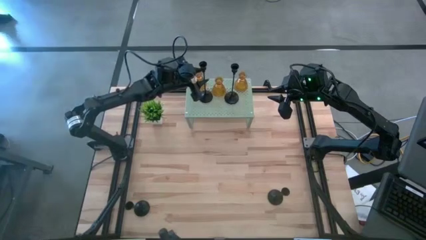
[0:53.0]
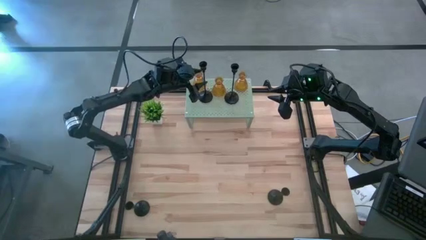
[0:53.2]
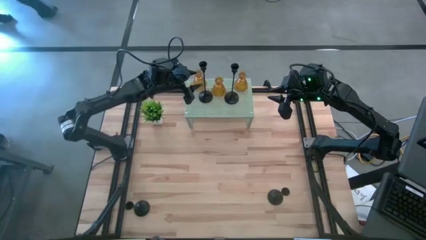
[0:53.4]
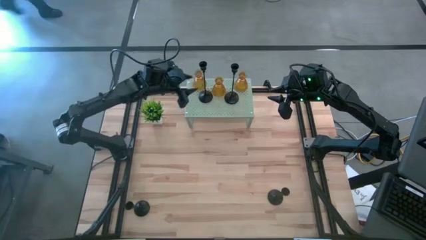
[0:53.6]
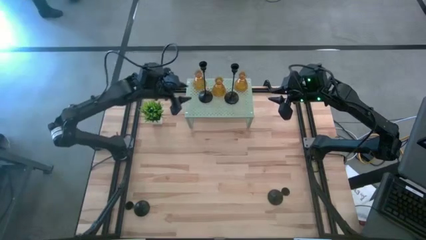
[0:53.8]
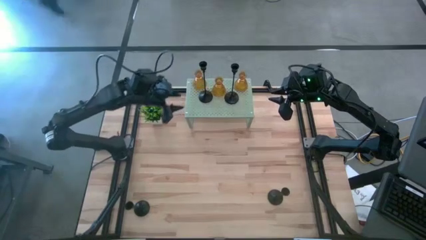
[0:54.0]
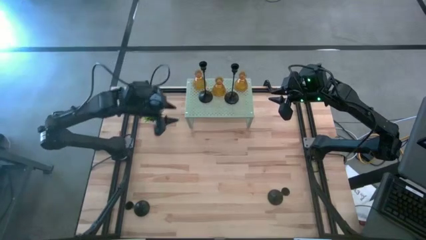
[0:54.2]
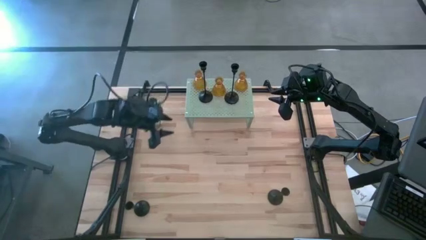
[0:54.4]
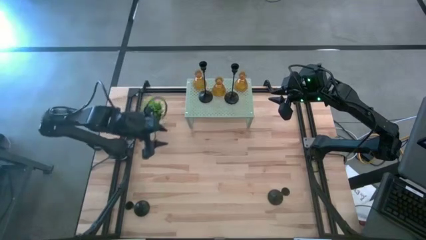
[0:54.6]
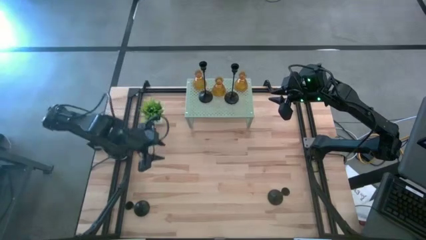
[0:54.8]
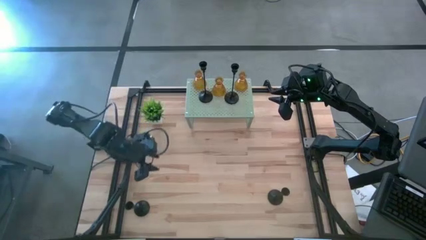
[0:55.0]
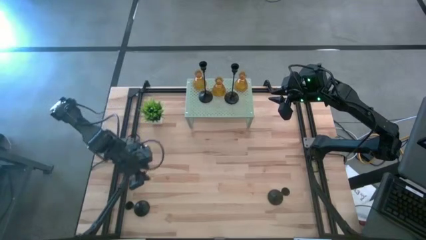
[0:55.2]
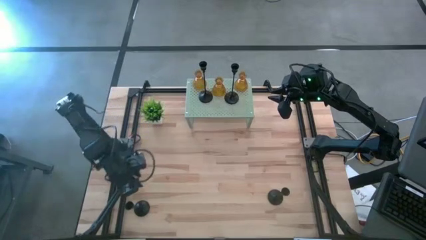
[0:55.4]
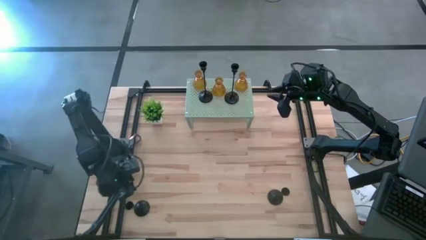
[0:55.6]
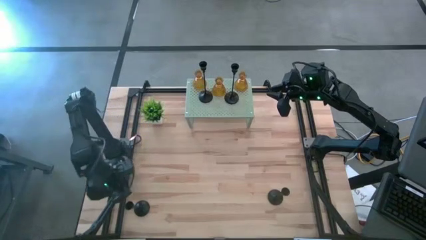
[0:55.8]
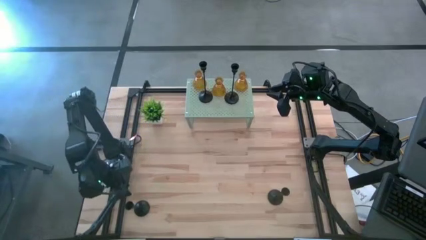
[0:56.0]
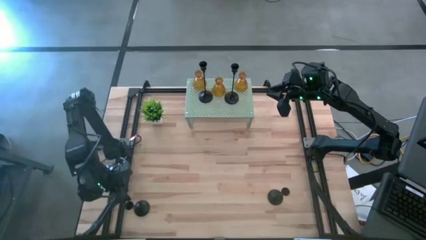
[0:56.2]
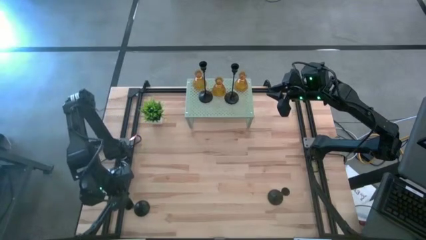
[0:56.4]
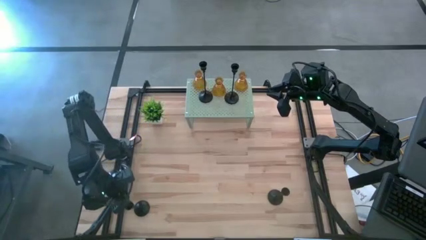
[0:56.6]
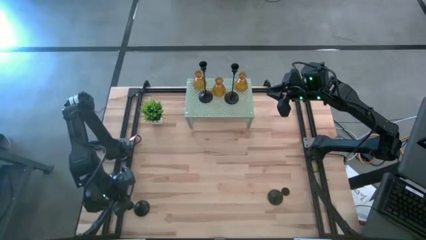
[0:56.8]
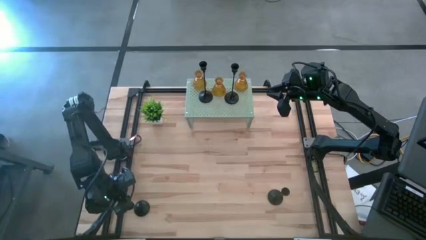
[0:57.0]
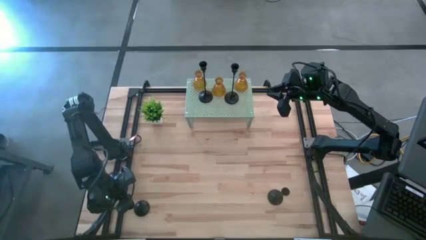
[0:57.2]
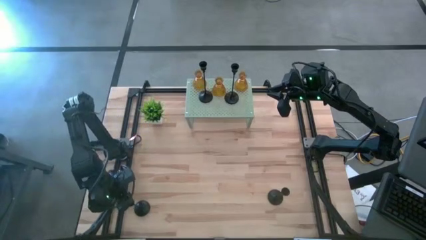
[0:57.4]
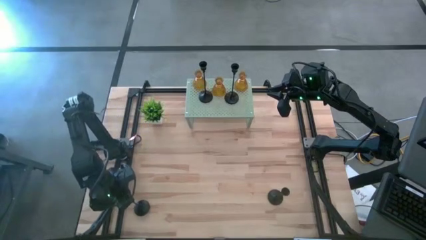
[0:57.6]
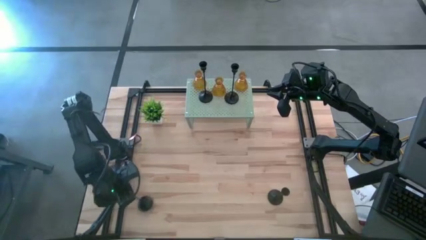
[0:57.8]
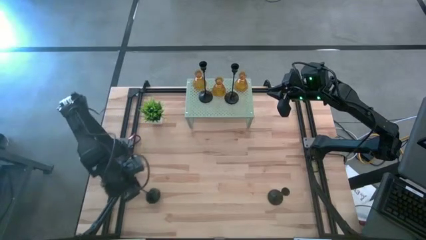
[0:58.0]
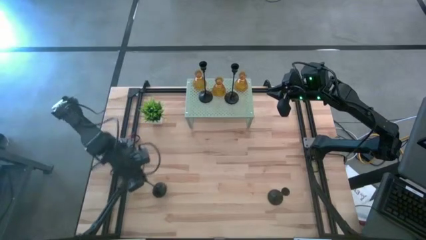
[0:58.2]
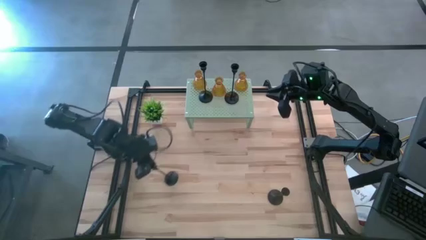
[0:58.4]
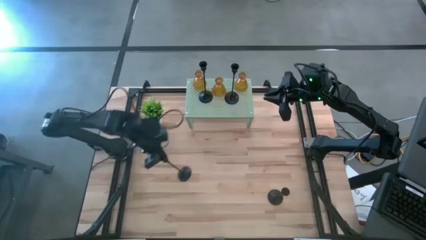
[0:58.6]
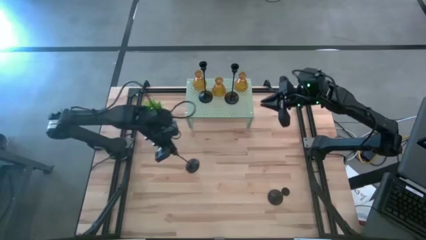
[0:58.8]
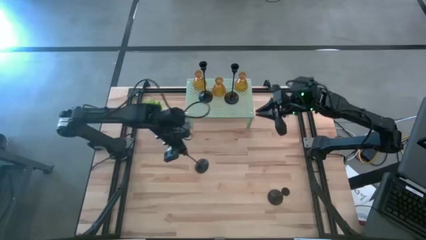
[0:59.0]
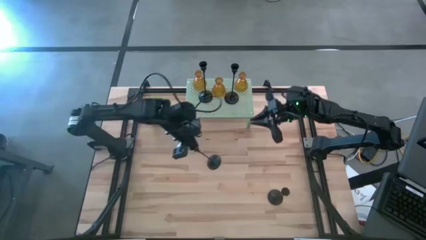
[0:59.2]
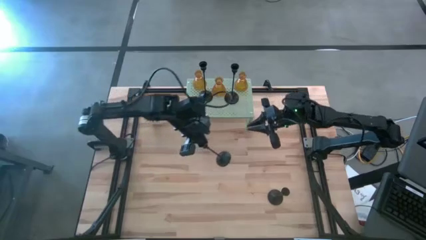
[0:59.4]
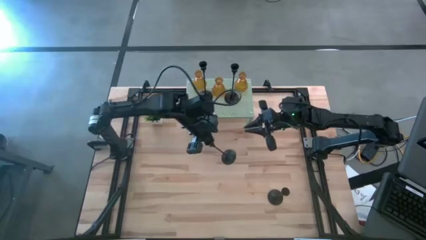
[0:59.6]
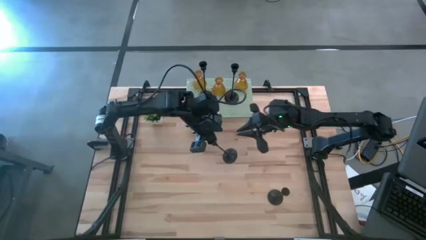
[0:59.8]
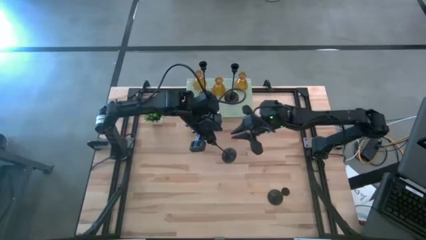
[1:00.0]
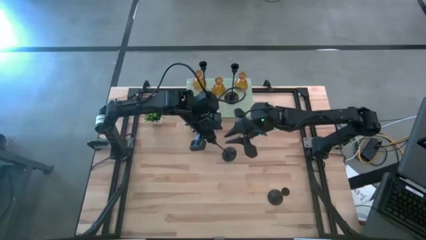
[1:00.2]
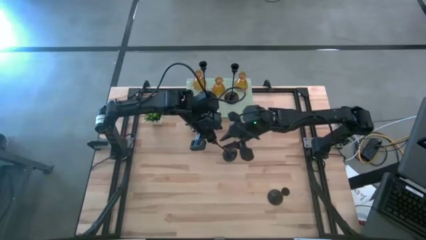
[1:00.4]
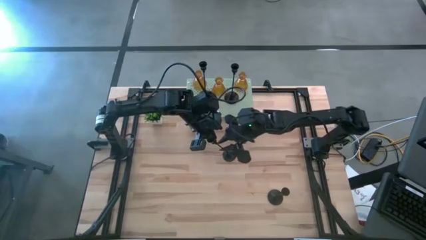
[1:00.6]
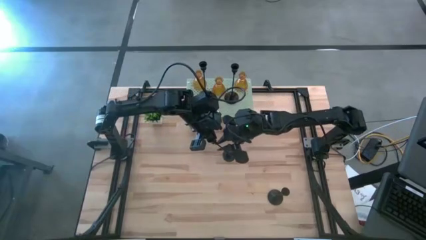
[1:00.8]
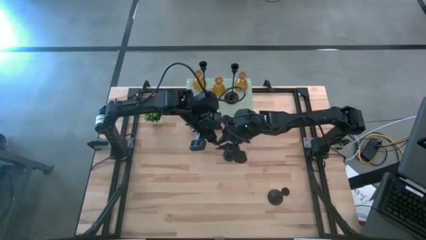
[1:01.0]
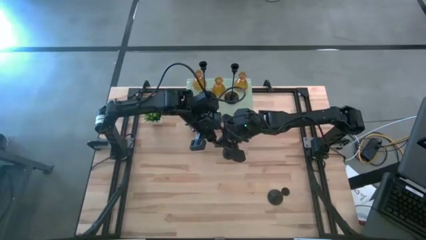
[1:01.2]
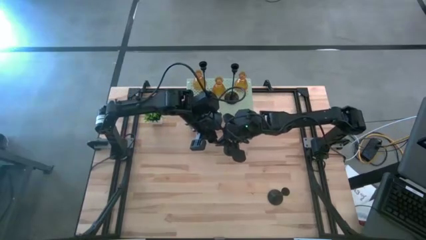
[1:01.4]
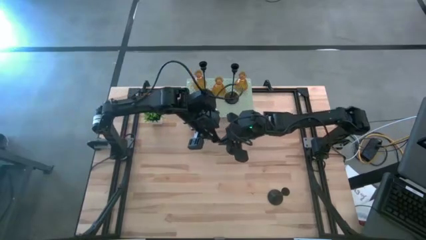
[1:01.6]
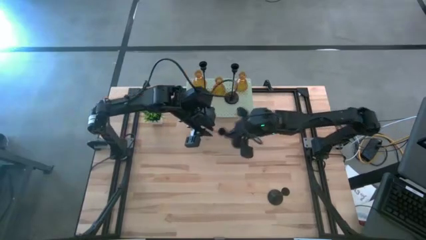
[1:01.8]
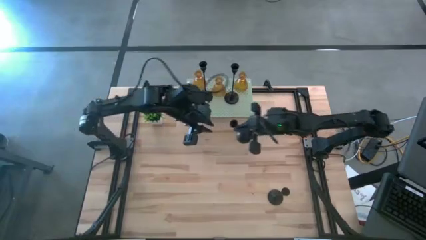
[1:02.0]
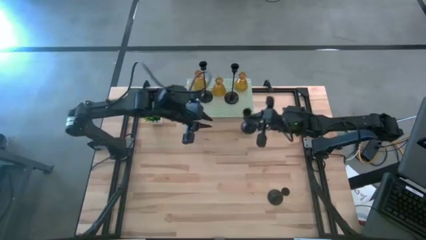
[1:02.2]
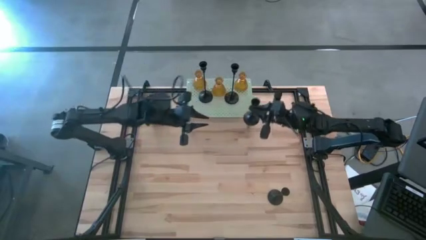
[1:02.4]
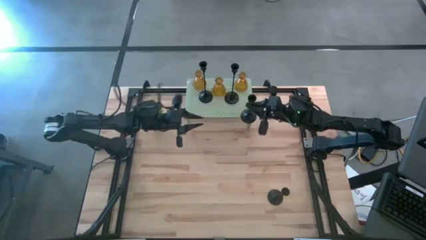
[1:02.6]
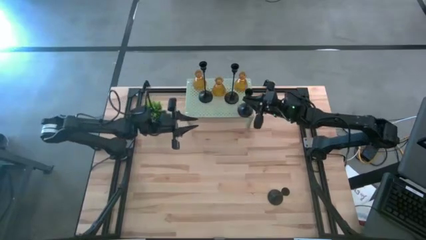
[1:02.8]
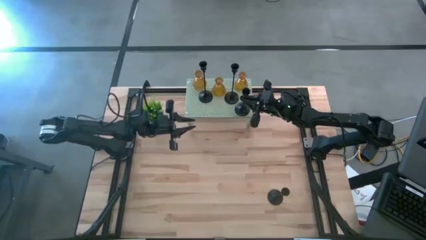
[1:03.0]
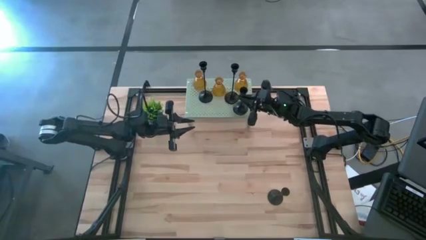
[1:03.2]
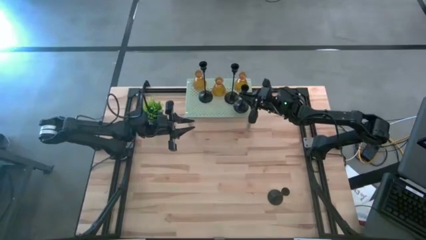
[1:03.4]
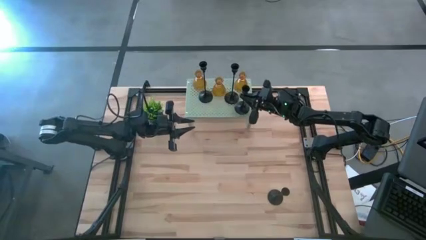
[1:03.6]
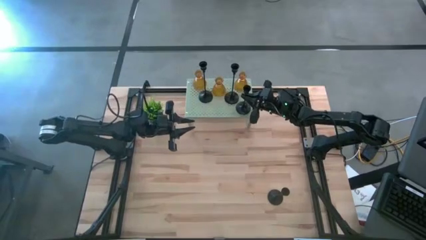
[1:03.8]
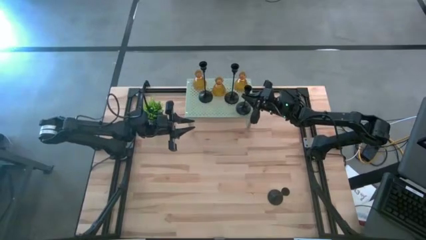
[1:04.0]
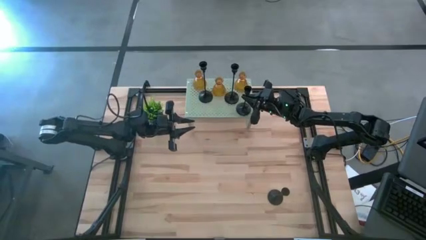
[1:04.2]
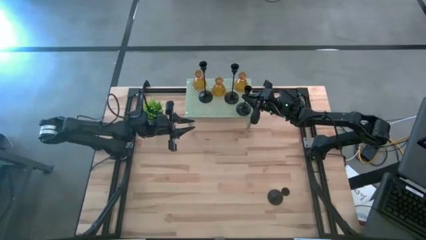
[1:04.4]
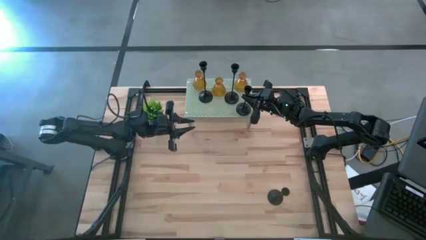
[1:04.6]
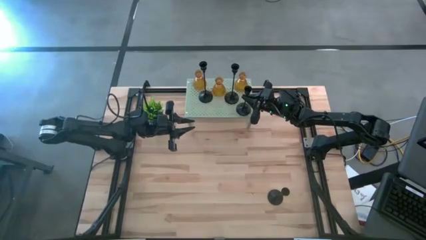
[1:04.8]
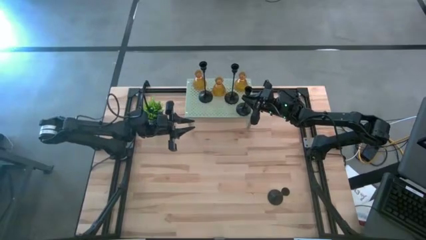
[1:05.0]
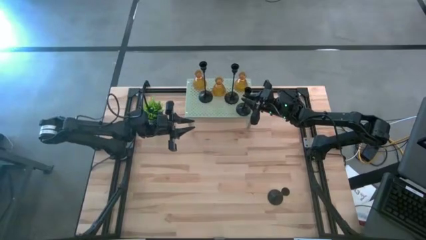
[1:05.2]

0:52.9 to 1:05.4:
Task: Pick & Place candle stick holders
Put the black candle holder on the shelf

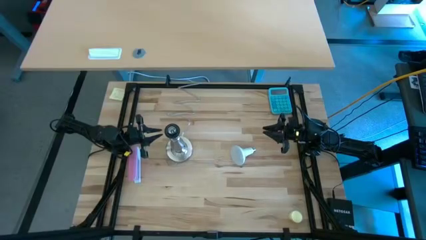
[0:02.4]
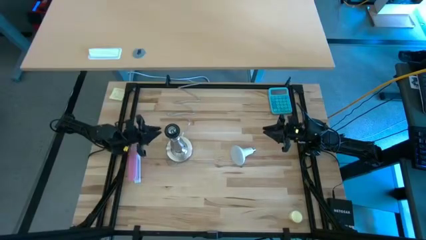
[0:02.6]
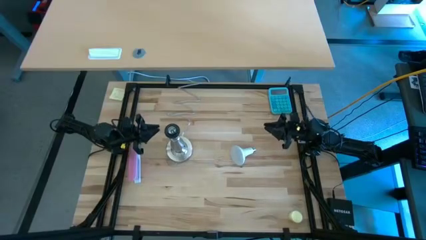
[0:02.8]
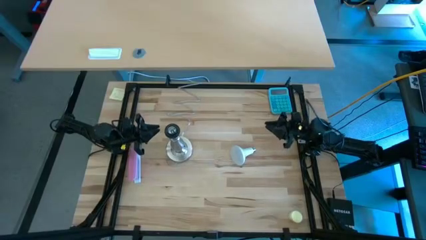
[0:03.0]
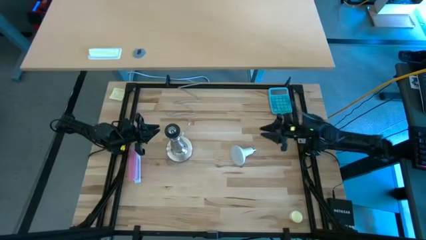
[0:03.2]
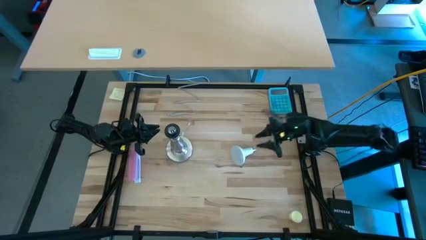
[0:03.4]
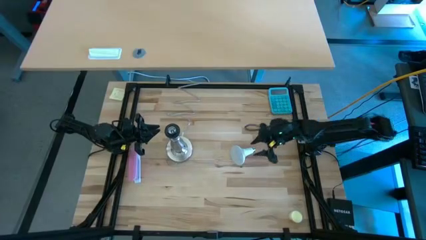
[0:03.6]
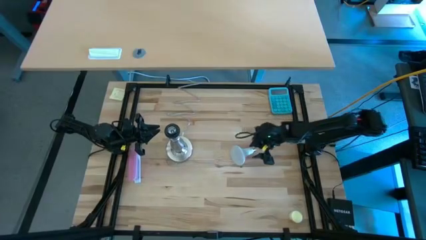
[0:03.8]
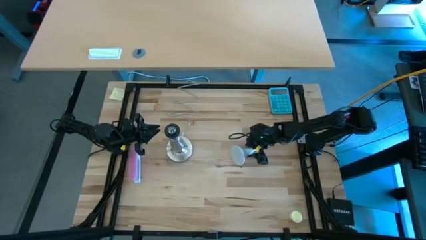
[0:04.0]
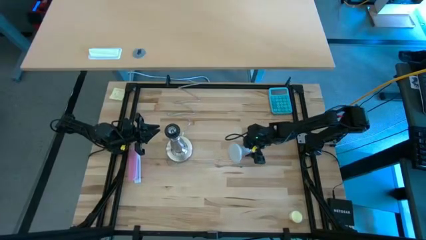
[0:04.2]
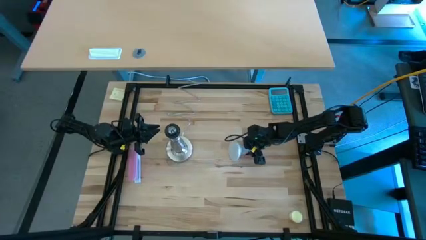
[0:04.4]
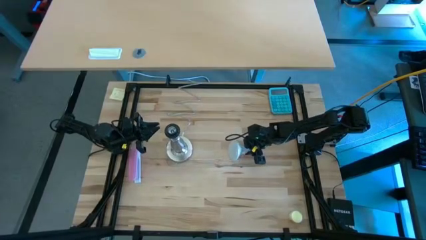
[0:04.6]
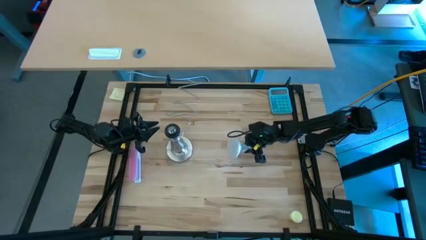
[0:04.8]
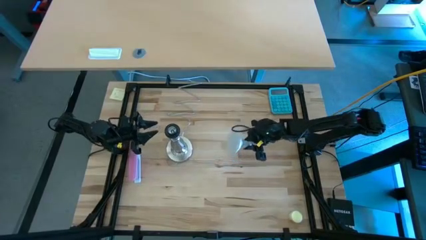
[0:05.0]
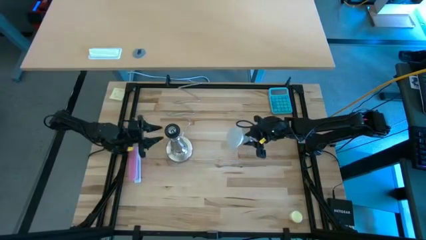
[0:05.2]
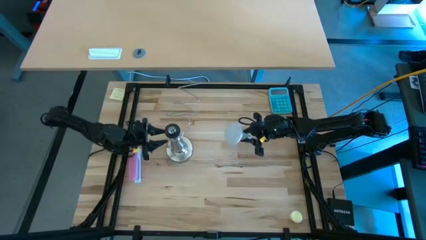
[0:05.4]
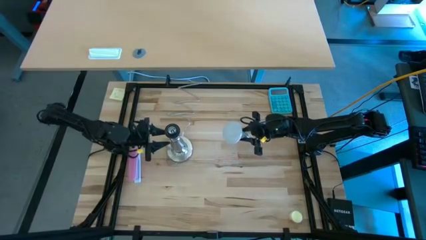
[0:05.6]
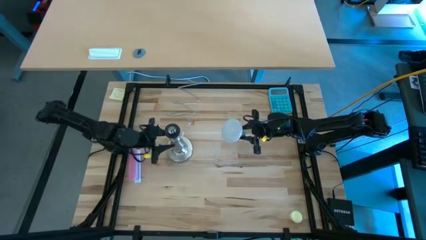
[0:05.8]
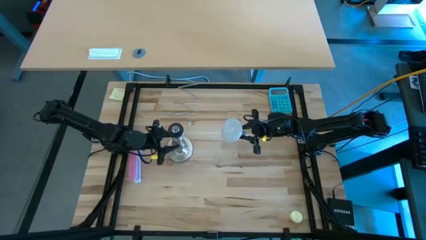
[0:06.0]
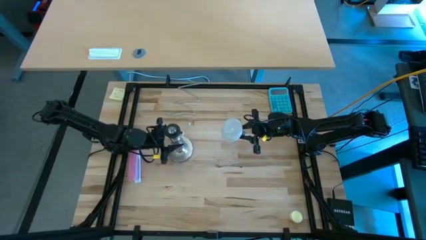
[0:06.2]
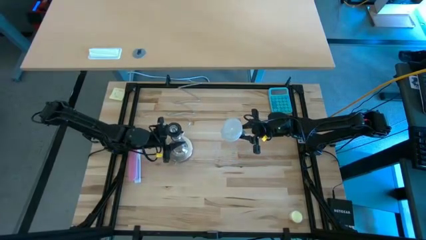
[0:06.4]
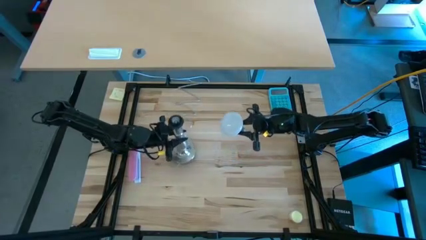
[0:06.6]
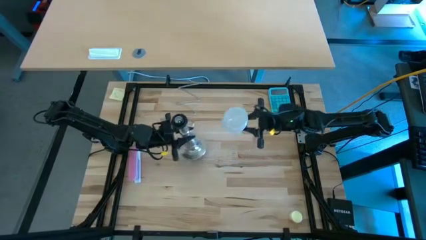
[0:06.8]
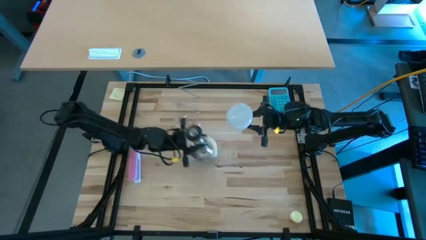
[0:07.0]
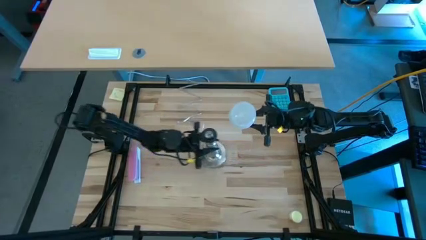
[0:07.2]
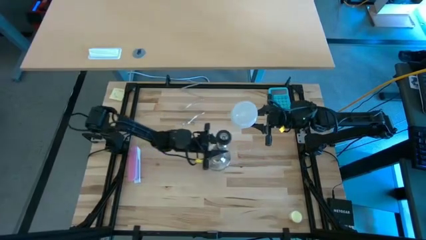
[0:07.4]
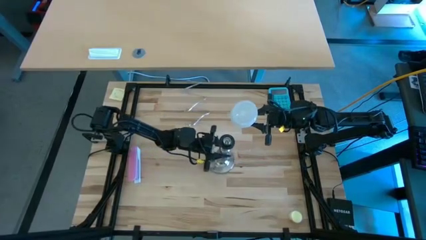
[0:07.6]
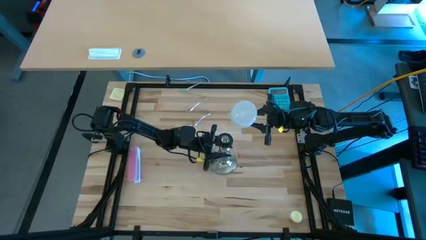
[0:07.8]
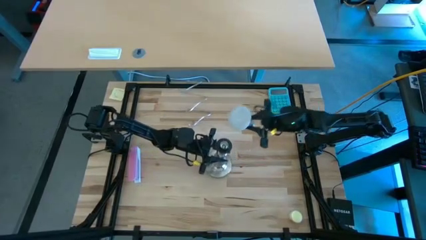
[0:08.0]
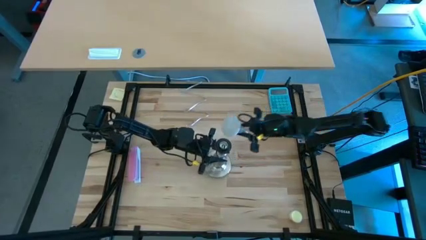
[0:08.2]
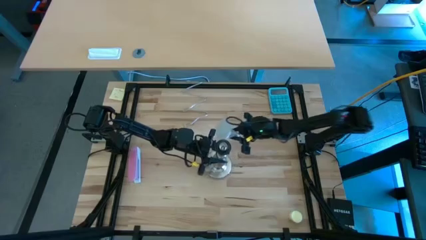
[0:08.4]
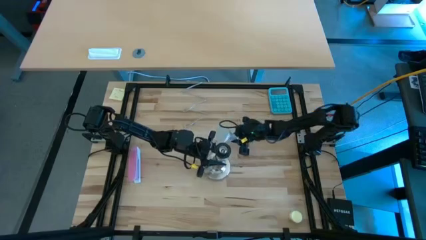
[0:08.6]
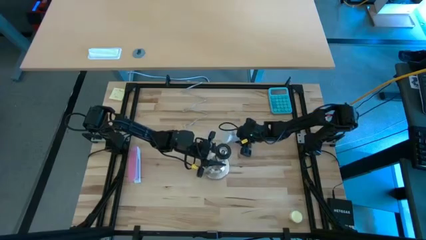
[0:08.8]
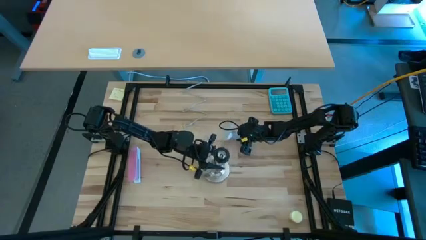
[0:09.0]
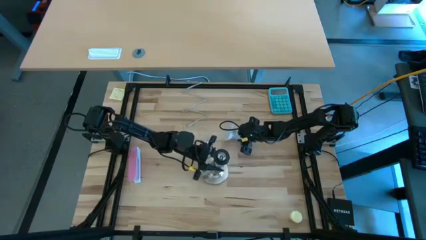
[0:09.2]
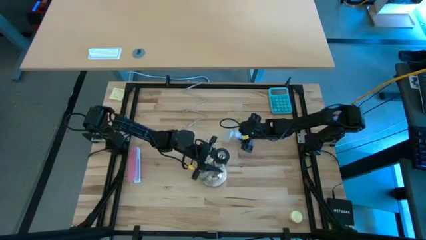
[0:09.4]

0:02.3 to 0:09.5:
Task: Screw lightbulb
Insert the white lightbulb on the silver lamp
